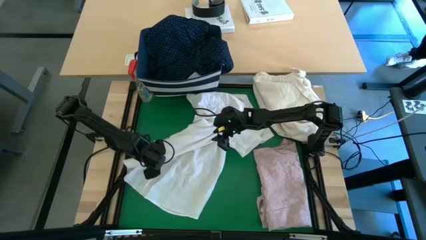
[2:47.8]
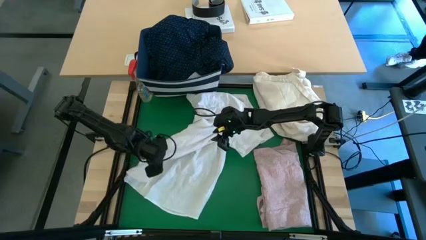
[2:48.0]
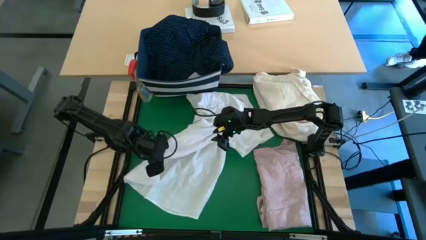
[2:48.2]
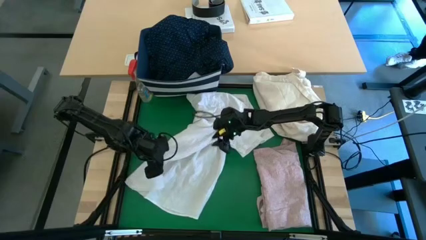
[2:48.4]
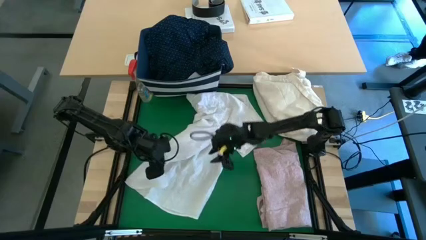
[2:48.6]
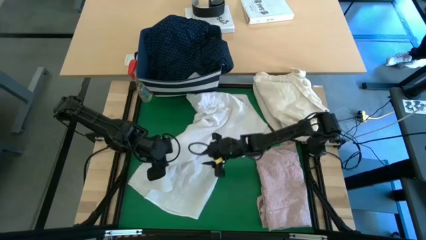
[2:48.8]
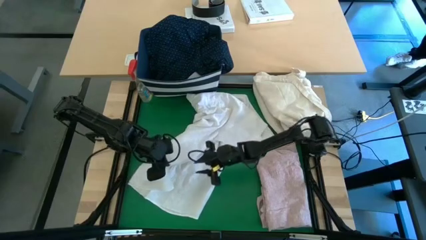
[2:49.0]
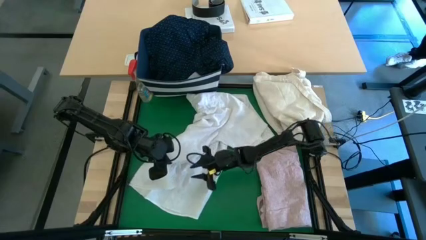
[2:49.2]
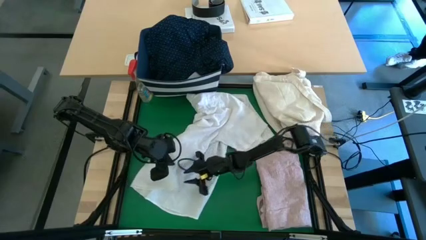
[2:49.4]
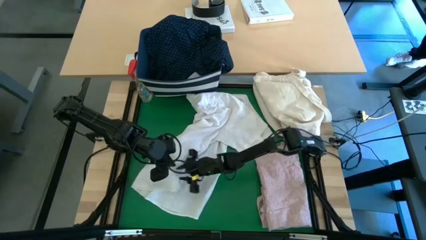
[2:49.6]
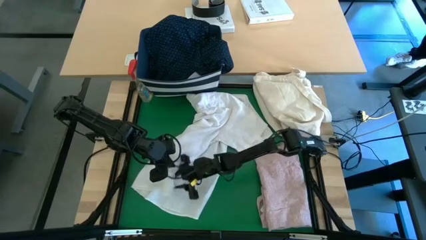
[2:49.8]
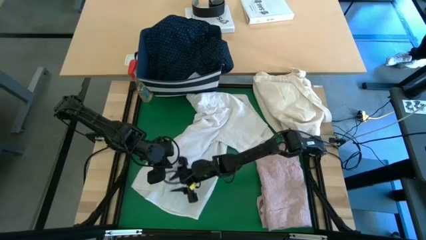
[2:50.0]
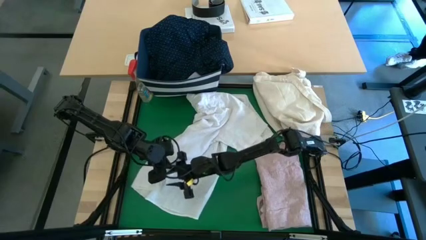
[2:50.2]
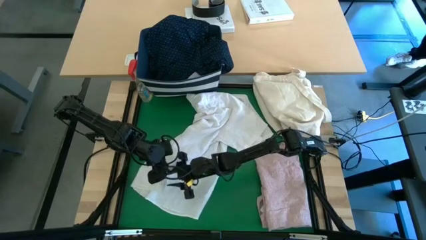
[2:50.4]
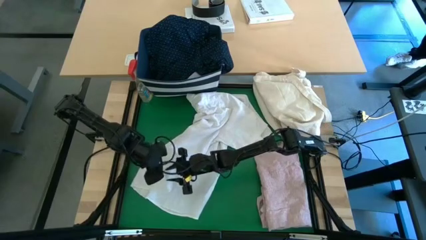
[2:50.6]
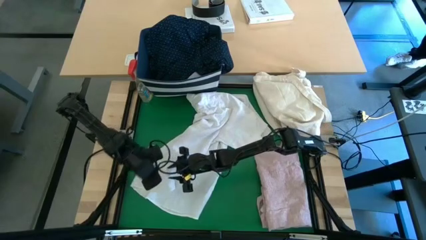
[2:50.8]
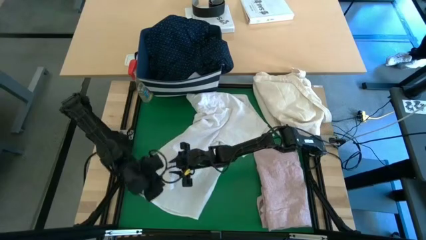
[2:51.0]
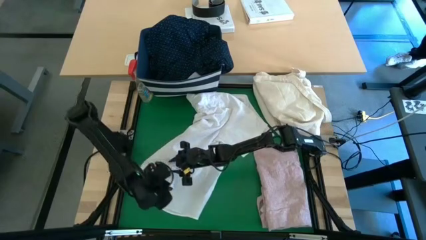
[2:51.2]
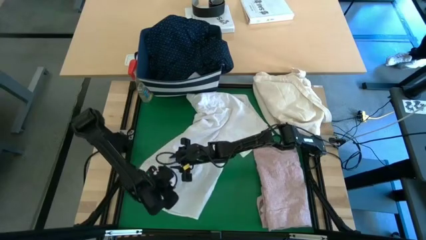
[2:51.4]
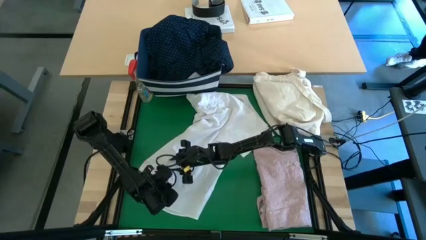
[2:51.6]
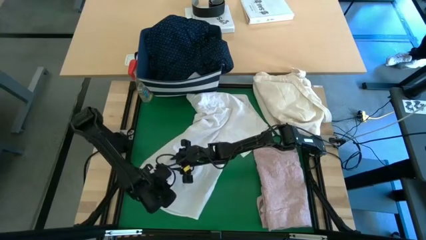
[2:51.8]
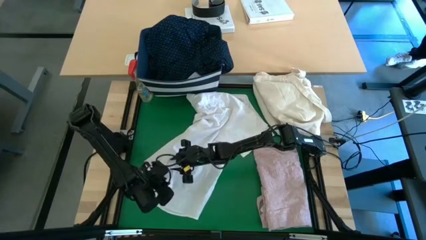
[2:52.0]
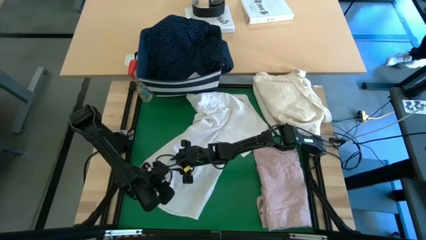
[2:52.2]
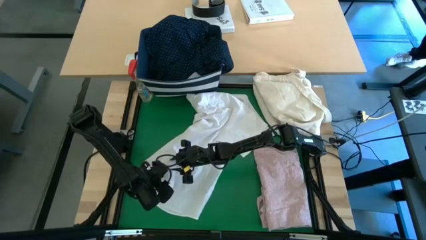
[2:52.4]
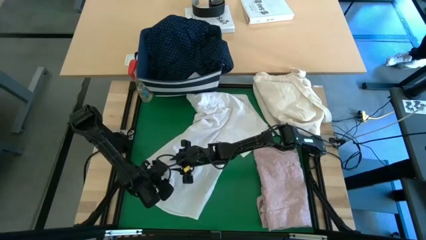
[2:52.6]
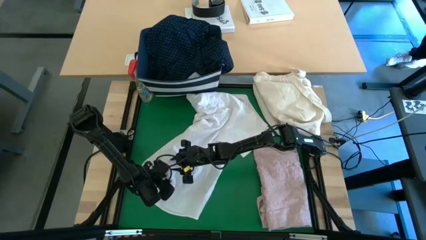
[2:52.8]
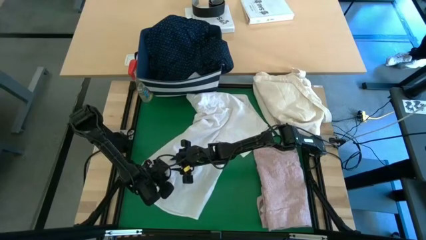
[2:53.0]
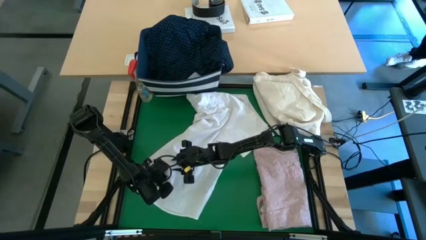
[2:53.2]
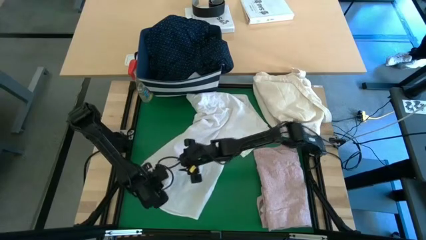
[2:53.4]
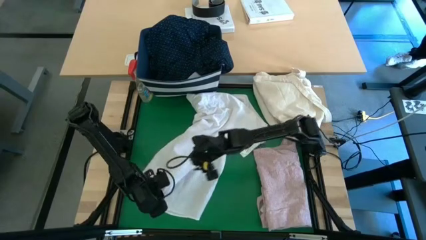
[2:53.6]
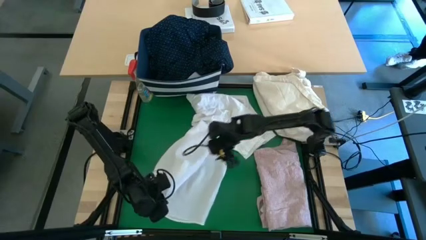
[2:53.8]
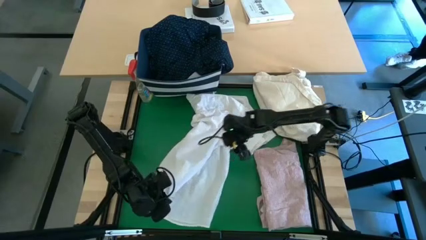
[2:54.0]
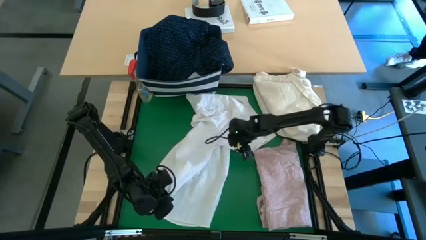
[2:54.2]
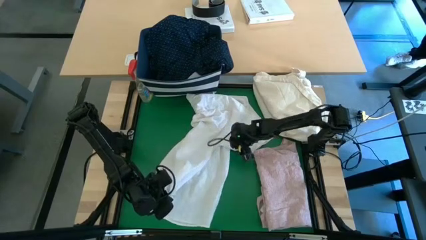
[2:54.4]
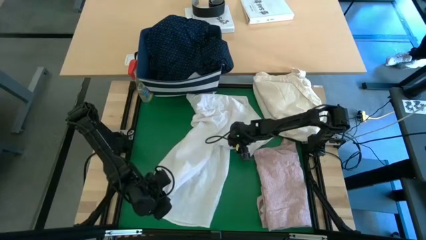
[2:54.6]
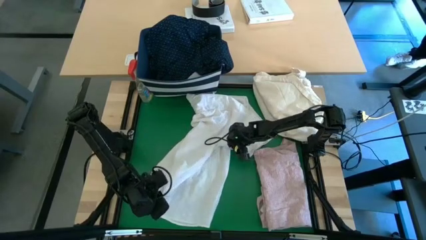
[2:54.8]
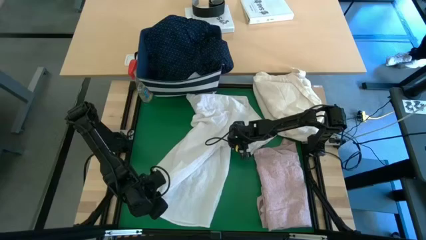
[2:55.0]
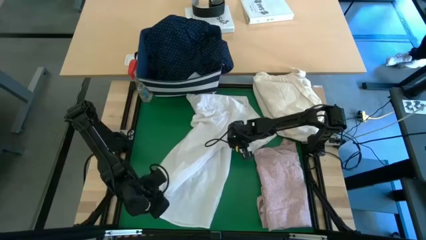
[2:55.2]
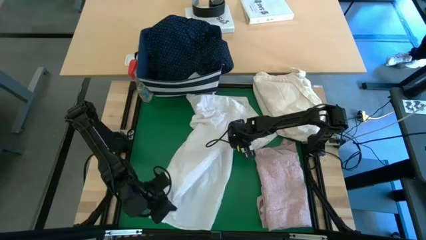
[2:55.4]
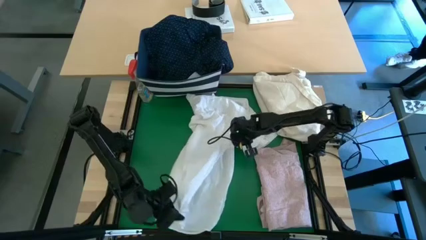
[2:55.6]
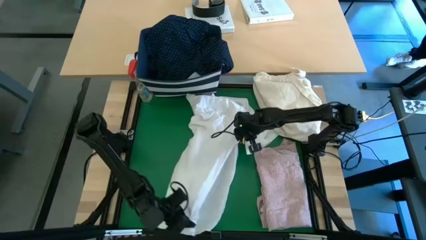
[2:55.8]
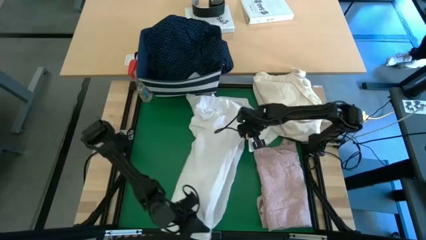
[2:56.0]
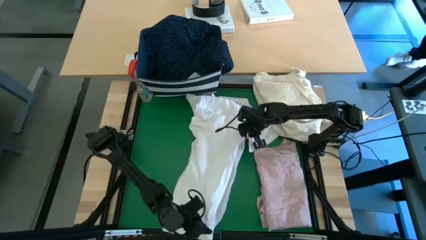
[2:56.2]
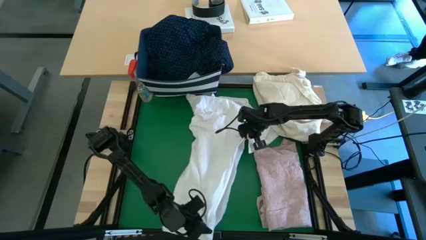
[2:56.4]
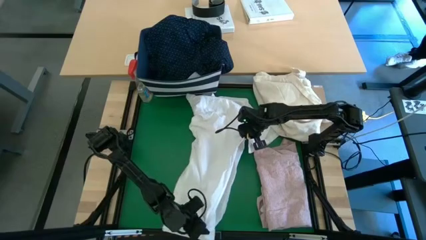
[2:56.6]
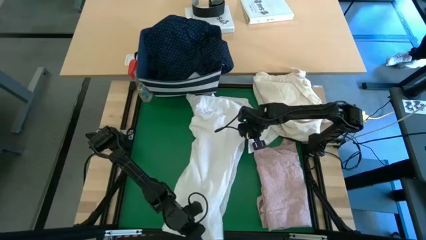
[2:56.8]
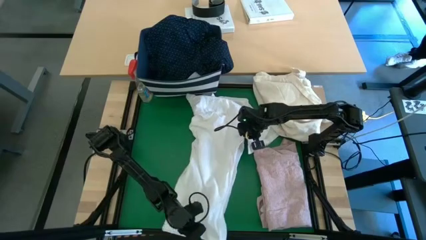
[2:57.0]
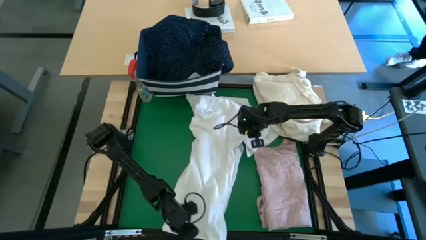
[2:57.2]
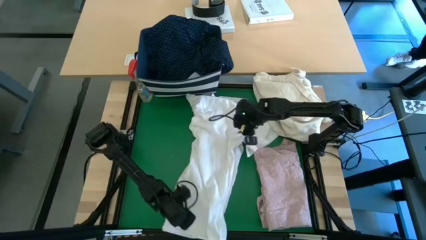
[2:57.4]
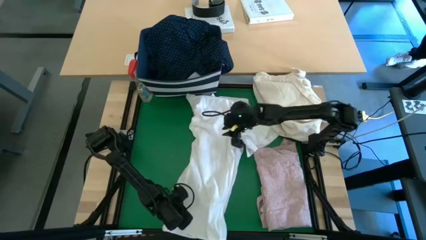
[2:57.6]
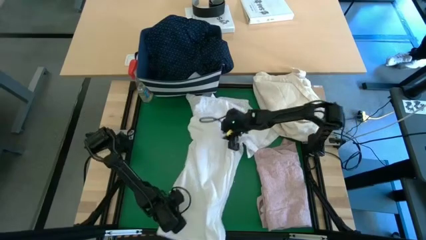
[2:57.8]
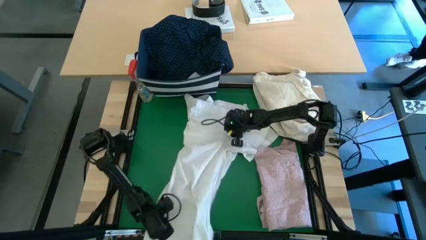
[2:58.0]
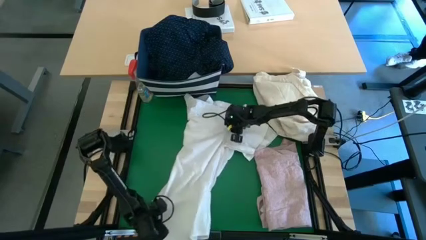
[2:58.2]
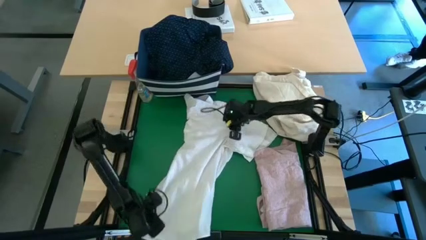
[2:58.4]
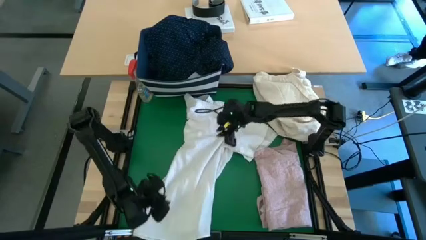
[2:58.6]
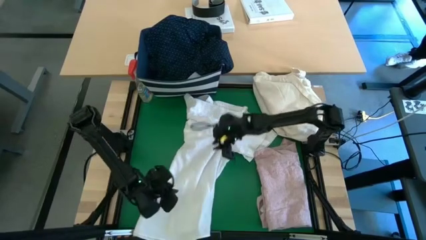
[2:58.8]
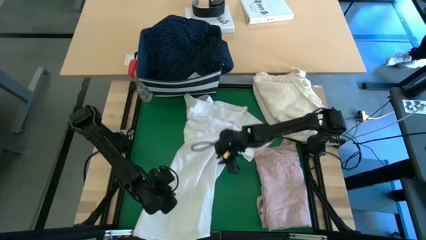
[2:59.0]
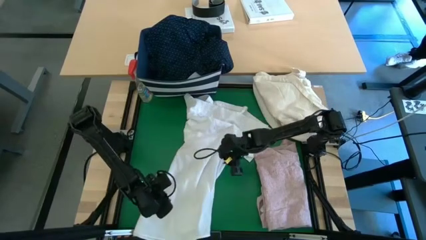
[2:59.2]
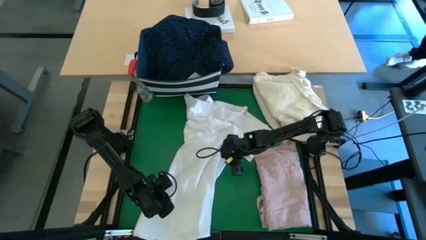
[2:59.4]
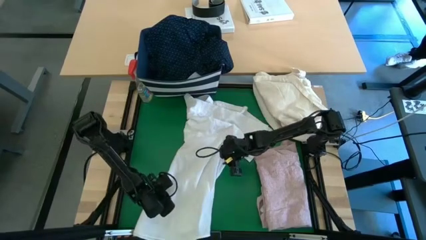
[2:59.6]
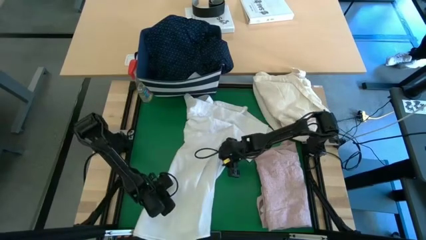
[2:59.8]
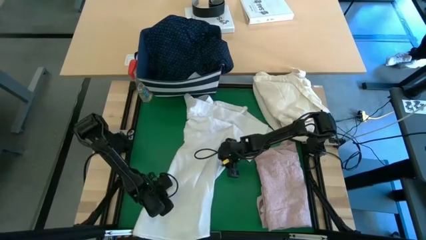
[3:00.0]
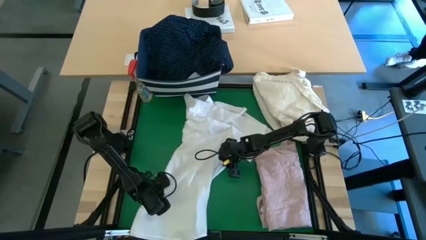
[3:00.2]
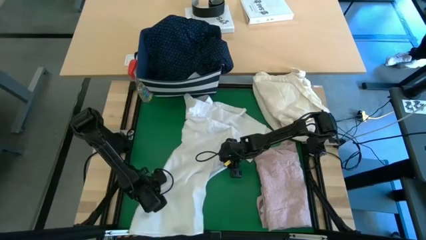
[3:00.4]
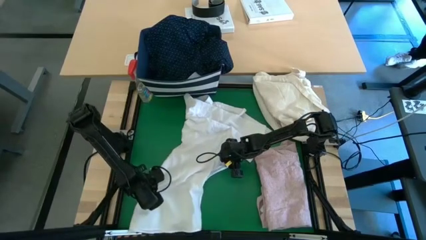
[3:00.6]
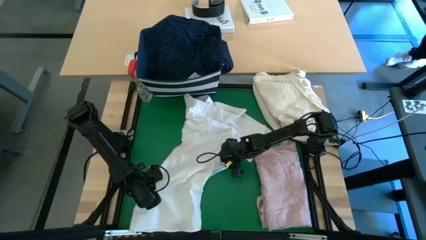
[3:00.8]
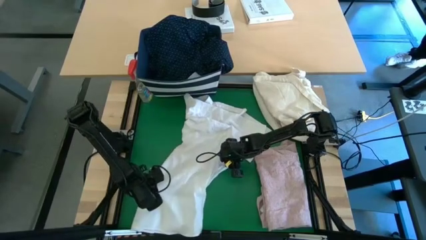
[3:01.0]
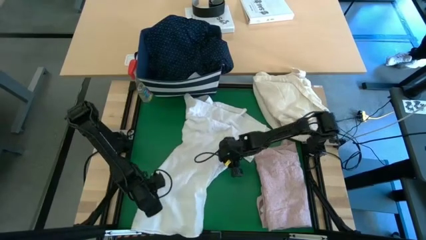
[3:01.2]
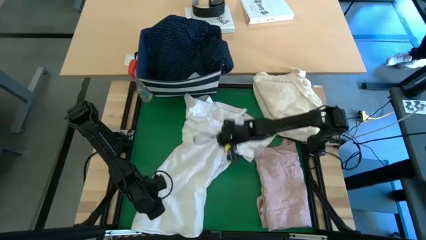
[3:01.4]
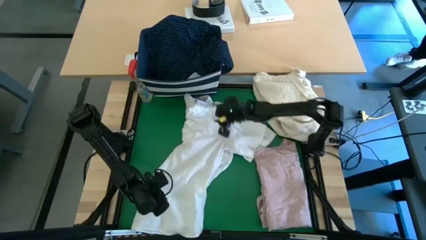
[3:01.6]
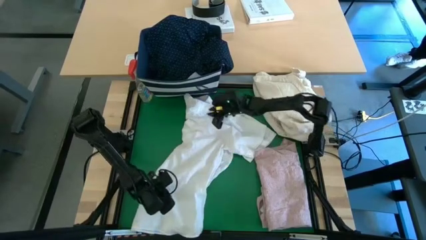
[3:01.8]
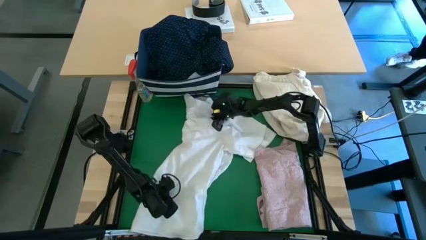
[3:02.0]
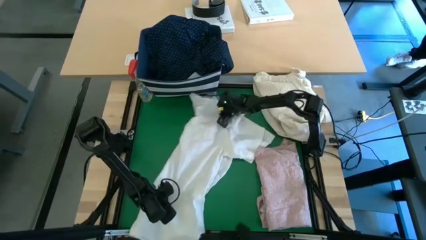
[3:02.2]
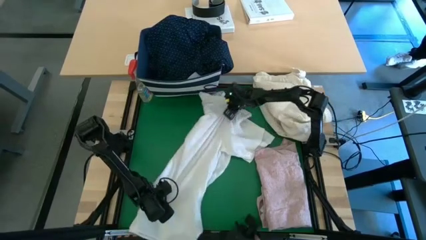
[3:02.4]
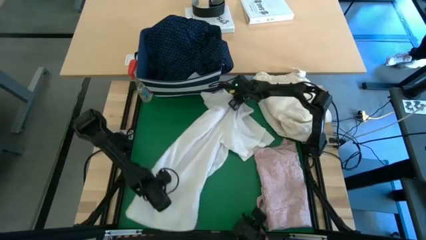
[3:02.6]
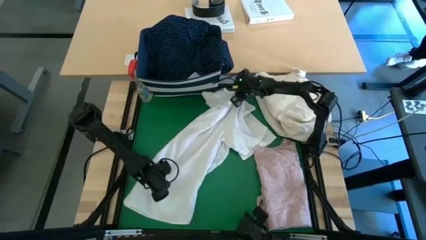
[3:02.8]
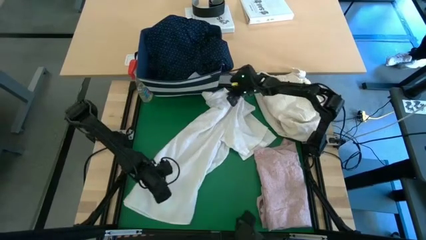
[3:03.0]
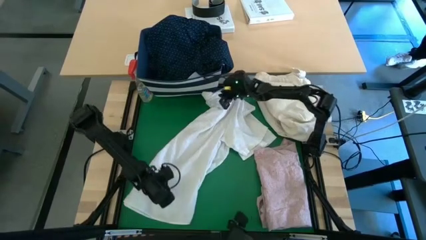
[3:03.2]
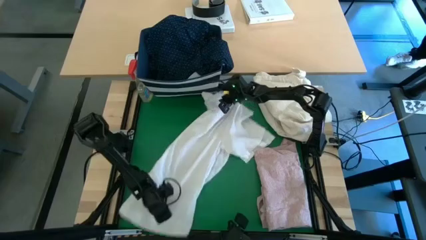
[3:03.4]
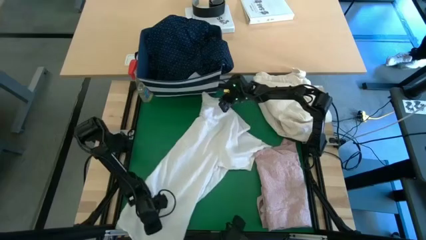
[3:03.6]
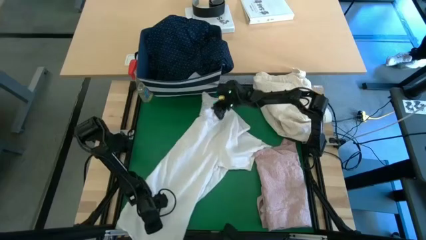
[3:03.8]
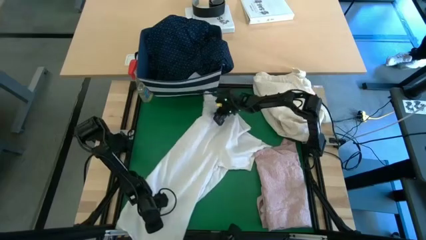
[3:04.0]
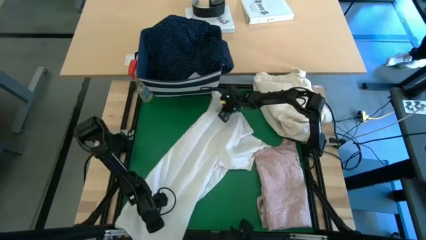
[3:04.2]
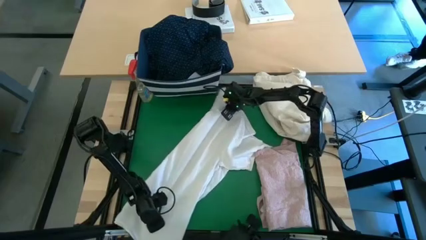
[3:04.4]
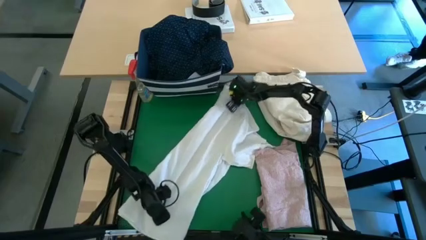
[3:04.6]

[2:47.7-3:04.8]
Task: Fold laundry
Fold the white polo shirt
